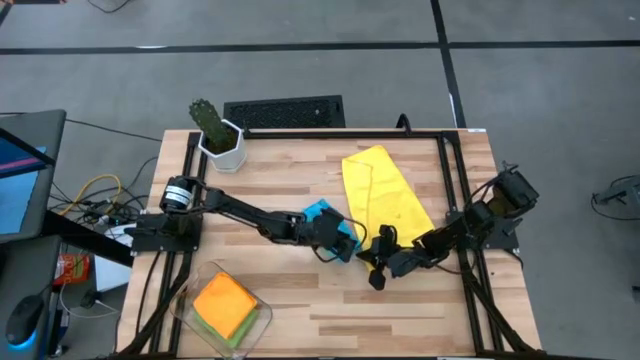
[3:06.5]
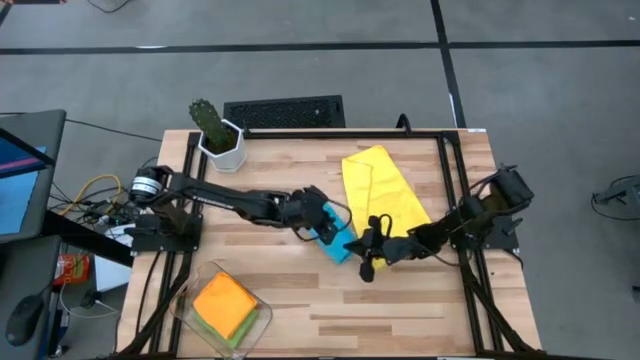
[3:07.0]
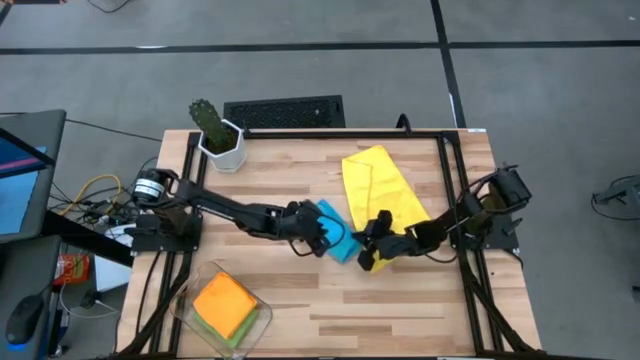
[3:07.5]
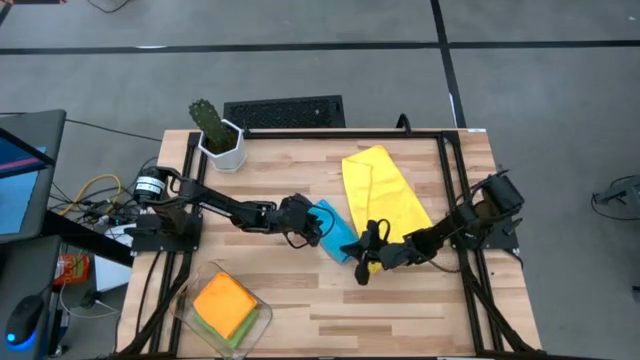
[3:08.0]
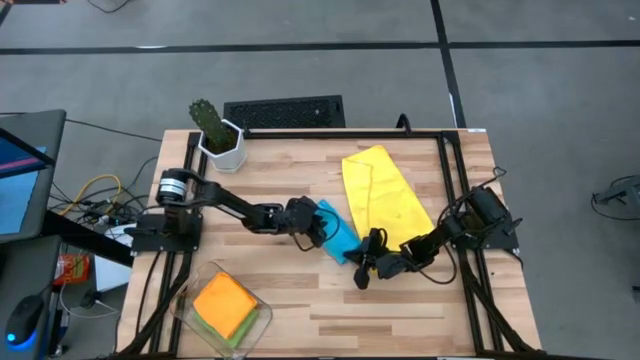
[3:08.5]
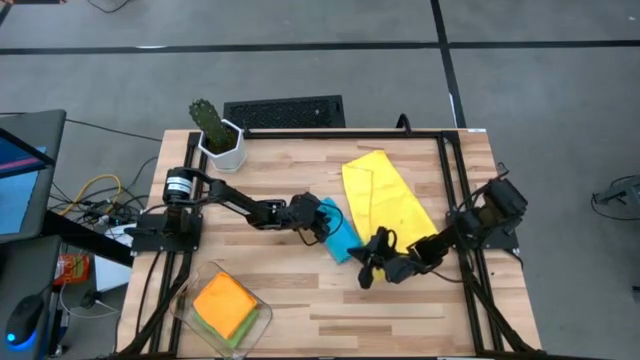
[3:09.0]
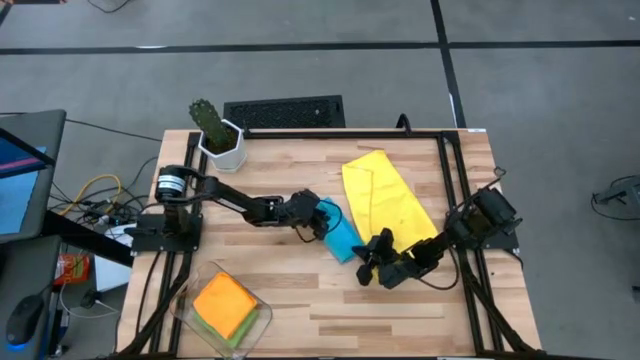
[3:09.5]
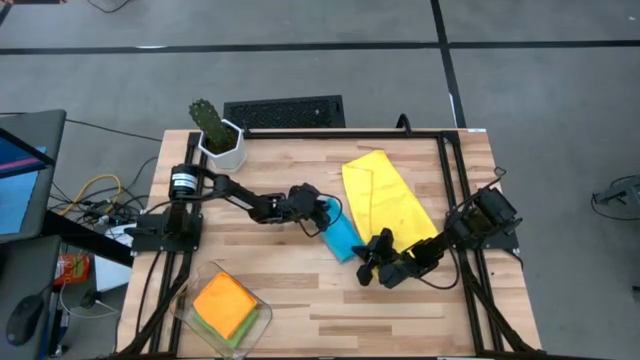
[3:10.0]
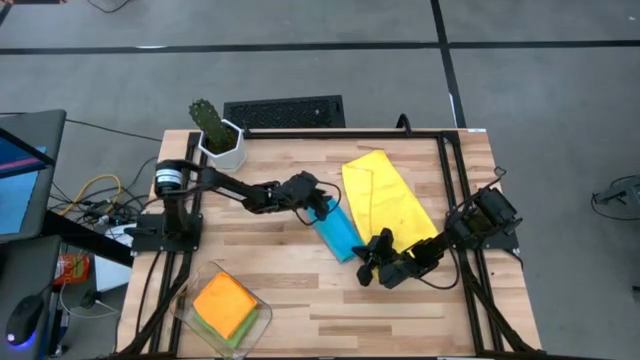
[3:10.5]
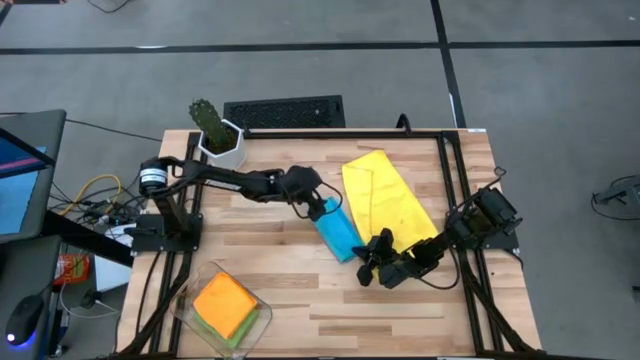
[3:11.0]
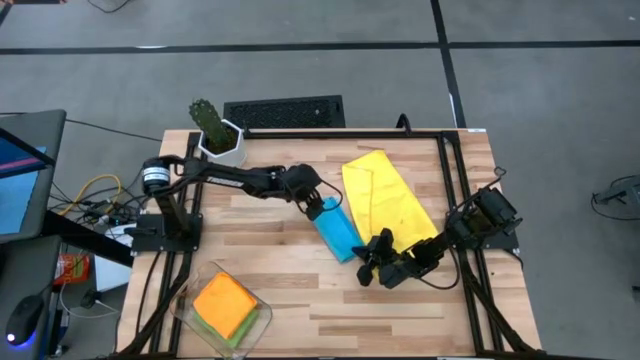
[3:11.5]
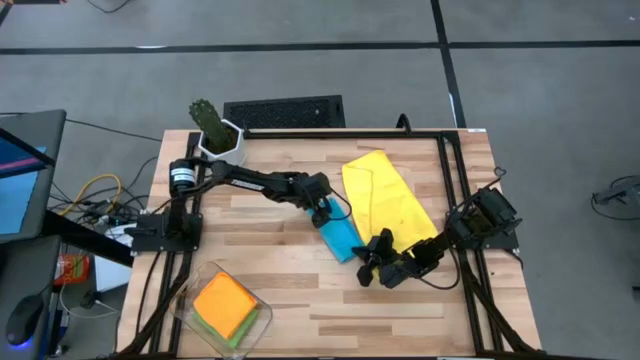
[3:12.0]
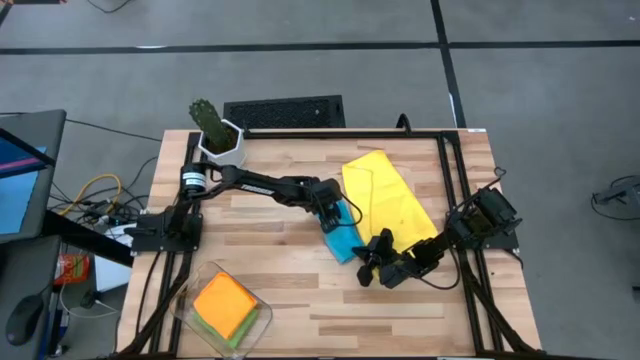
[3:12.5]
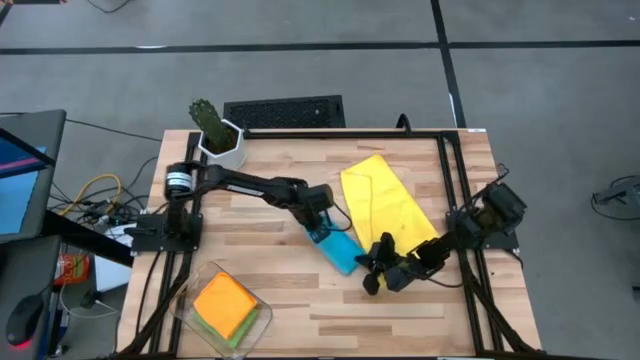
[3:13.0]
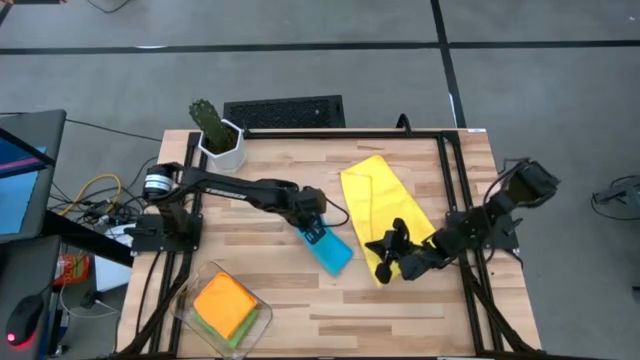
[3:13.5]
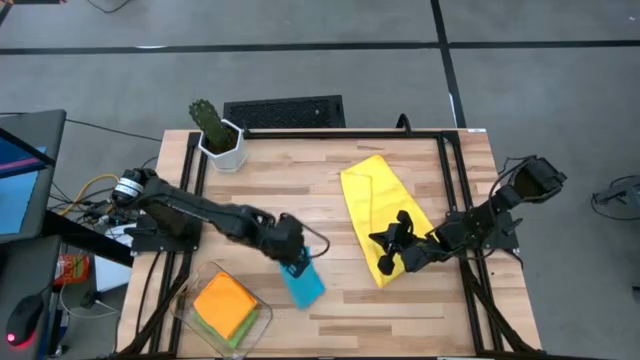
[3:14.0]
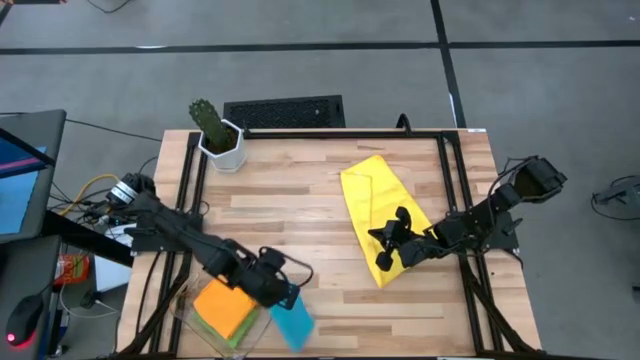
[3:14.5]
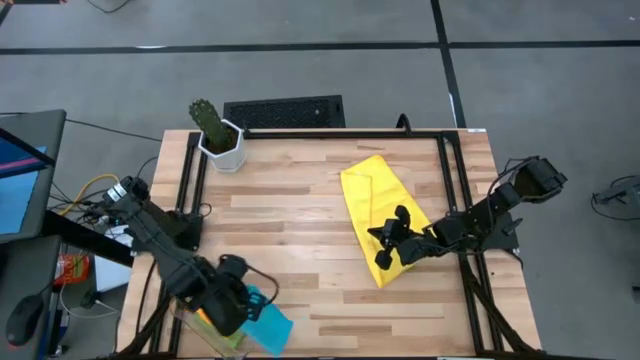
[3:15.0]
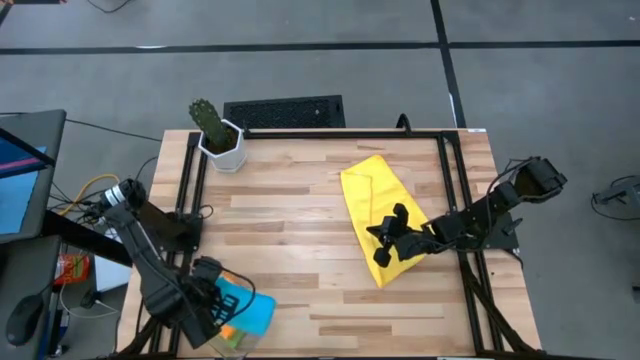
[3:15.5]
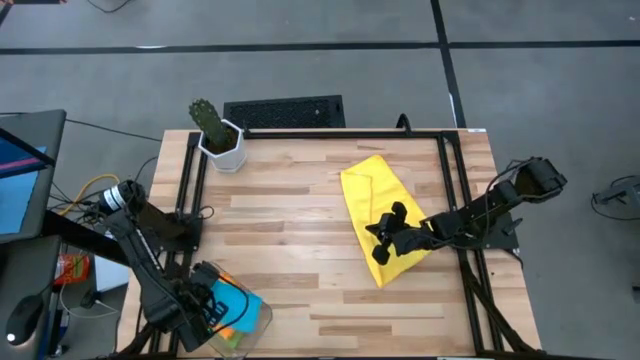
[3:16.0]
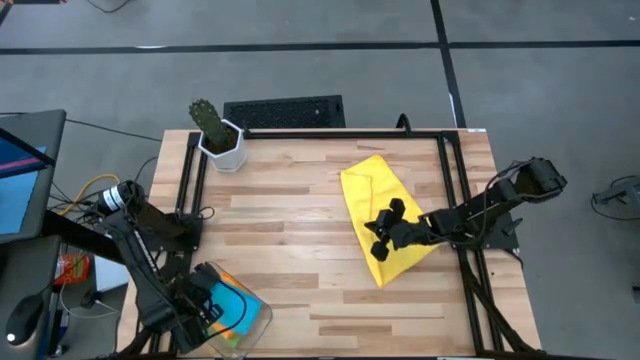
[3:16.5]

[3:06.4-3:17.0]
Task: Fold microfiber towels
Put the blue microfiber towel into the transparent bin

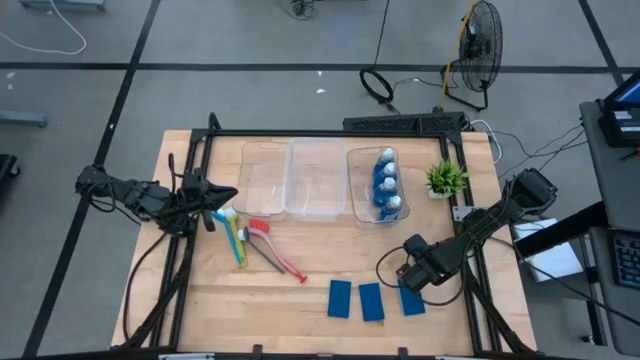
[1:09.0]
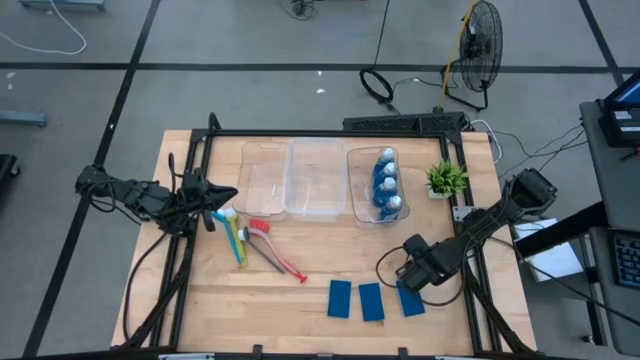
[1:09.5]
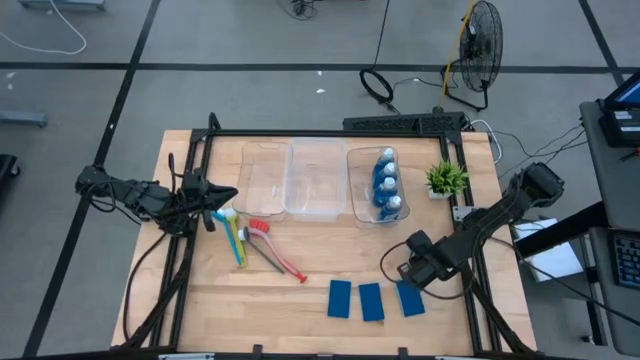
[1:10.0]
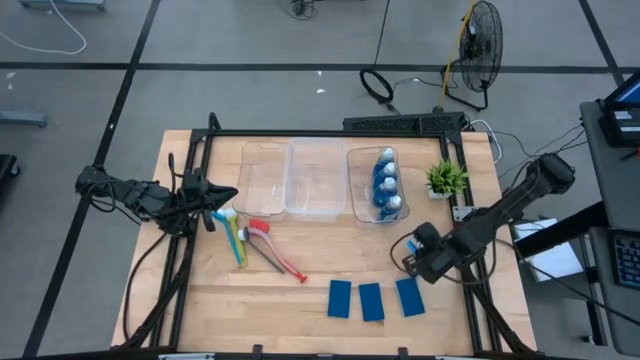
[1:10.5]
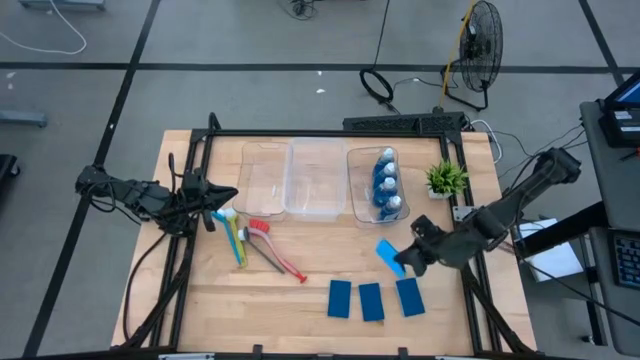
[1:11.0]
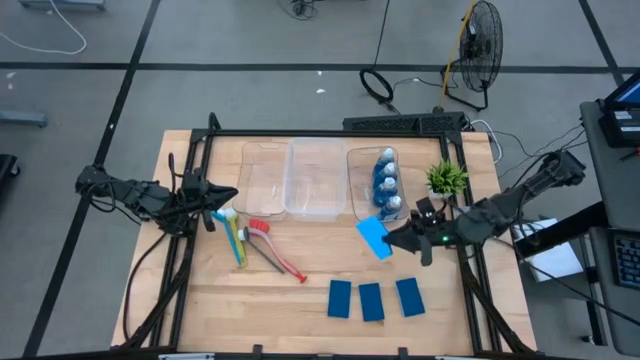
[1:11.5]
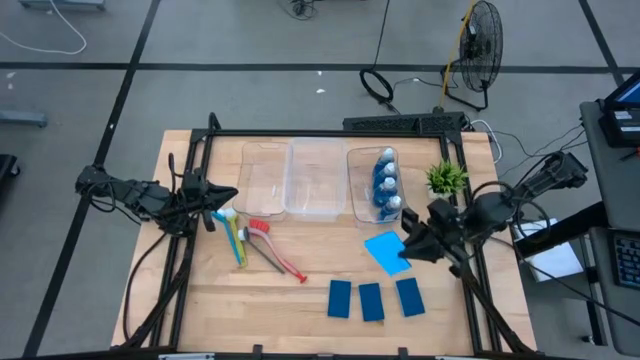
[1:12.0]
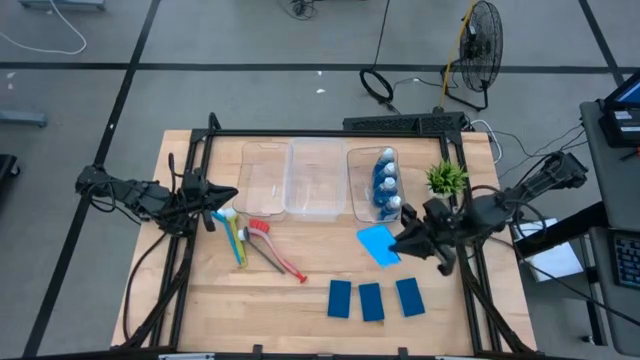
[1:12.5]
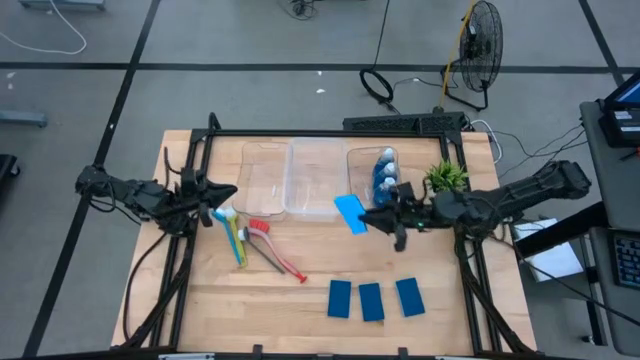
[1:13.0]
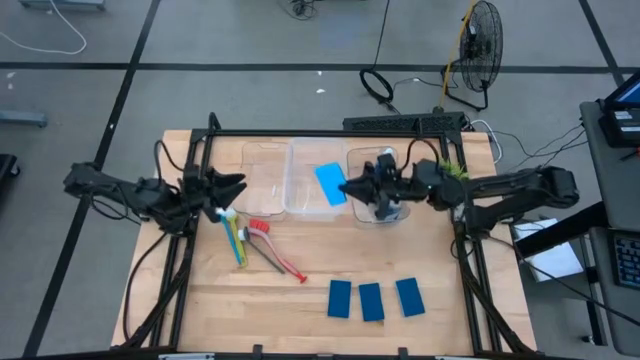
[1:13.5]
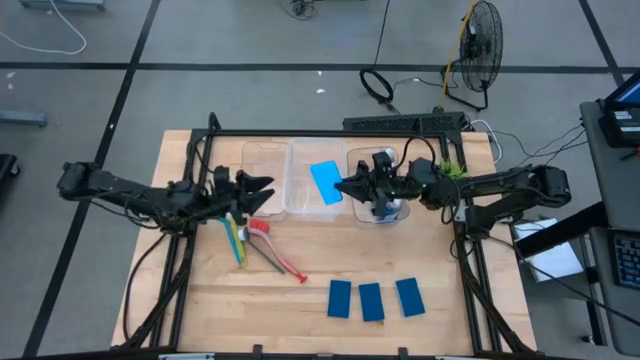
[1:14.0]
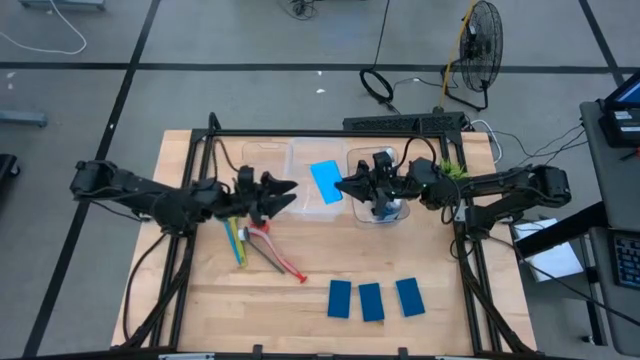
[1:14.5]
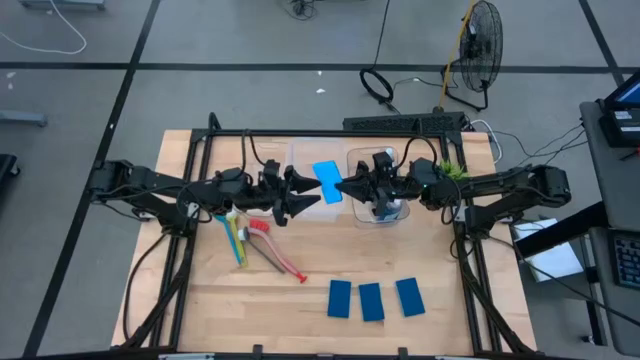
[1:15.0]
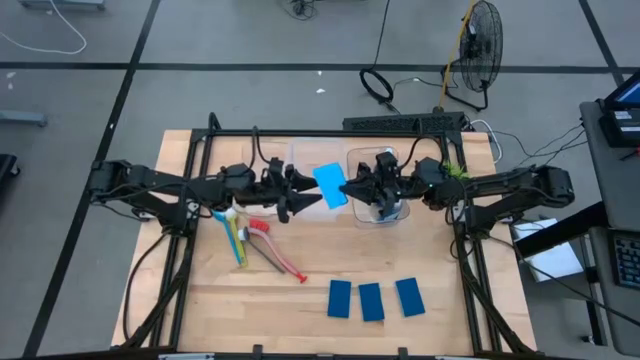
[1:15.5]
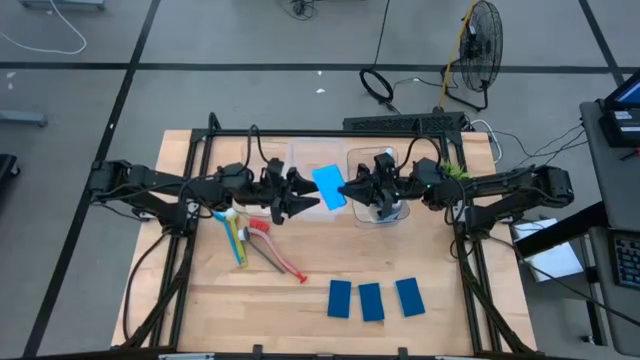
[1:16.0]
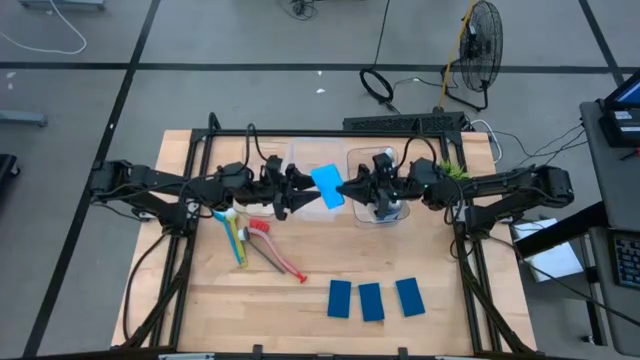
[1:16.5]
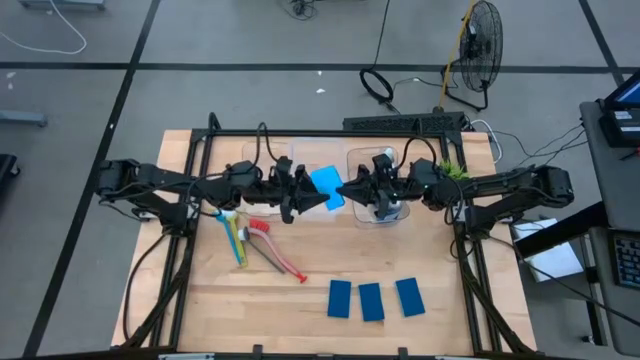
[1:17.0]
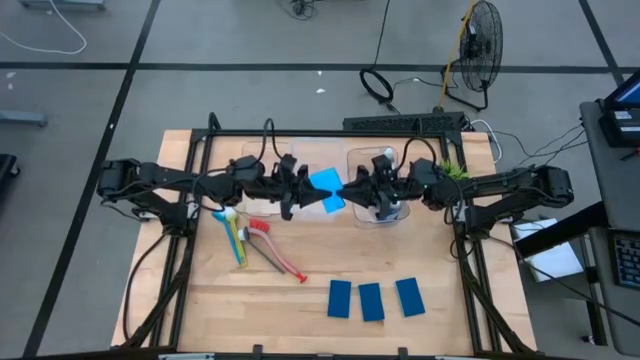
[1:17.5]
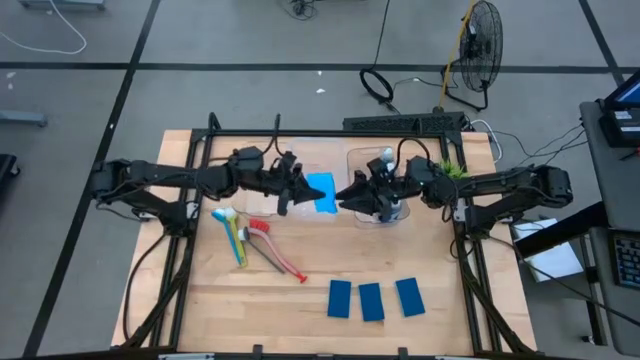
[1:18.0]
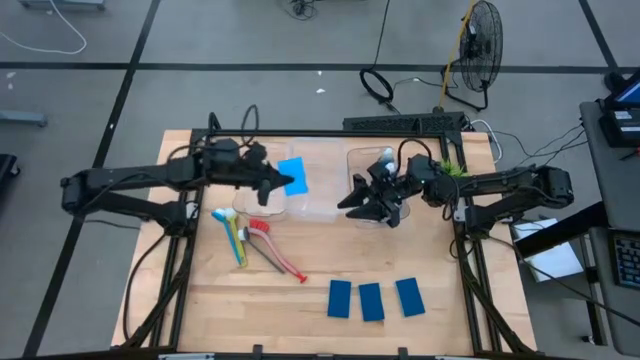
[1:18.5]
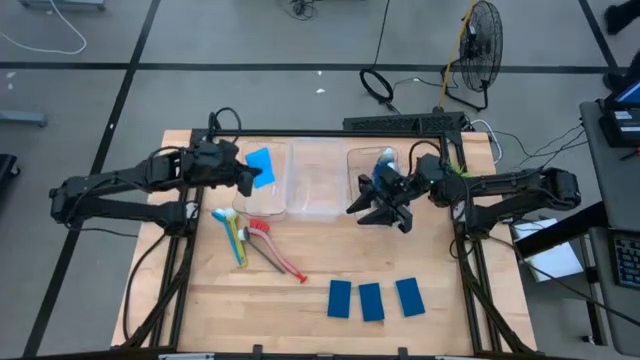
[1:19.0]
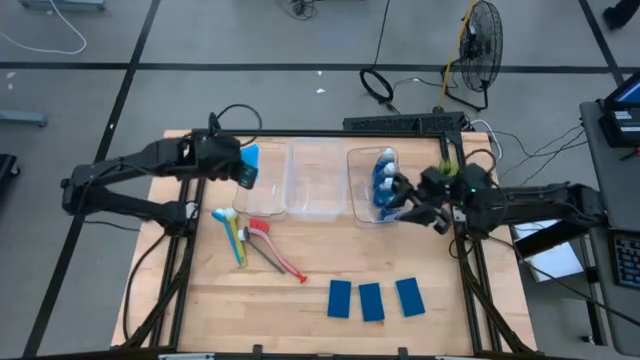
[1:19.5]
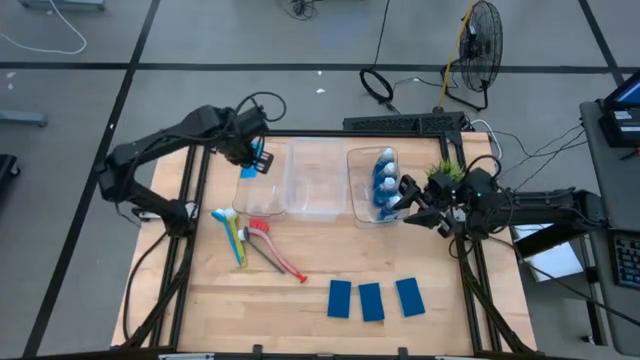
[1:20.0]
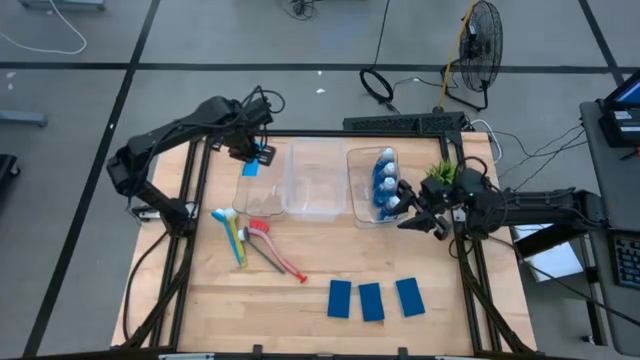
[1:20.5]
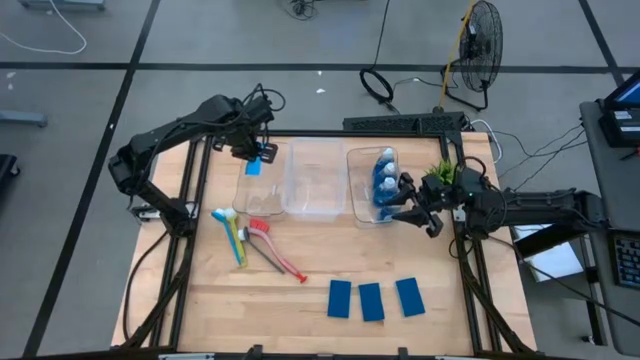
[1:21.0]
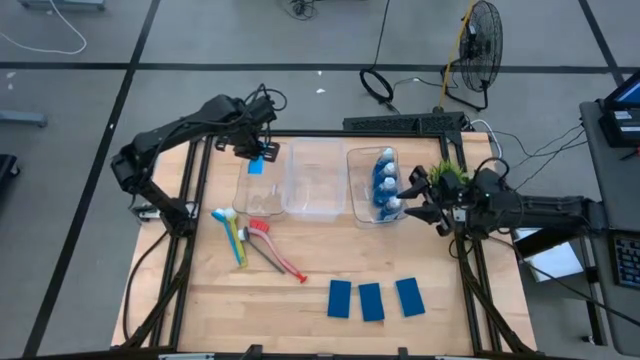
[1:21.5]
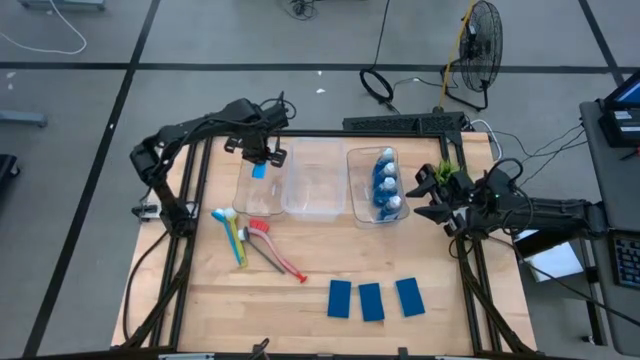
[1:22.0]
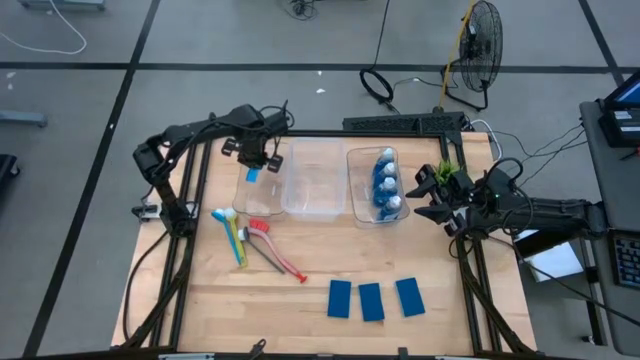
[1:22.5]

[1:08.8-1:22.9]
Task: Pick & Place Kitchen Sink Supplies
Put the blue sponge into the left transparent bin
